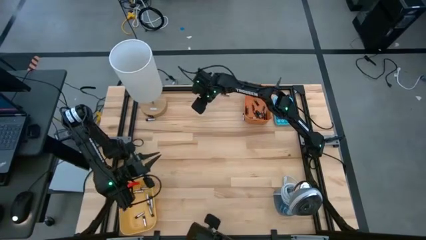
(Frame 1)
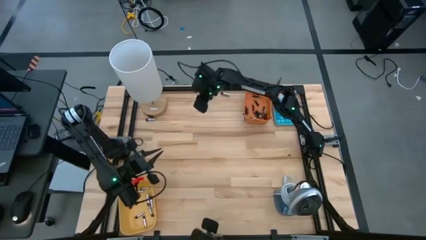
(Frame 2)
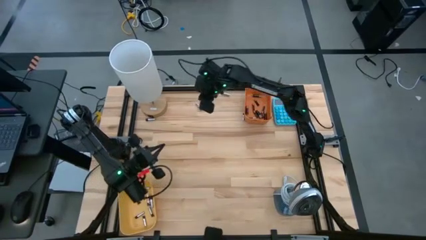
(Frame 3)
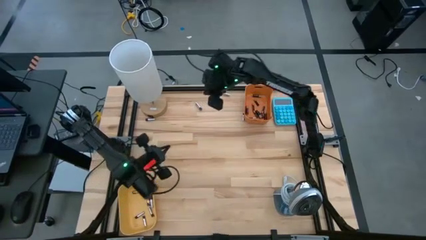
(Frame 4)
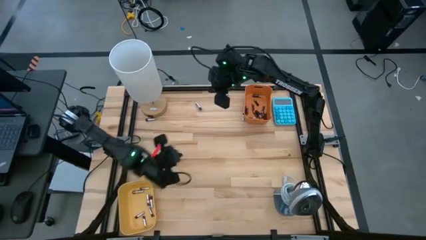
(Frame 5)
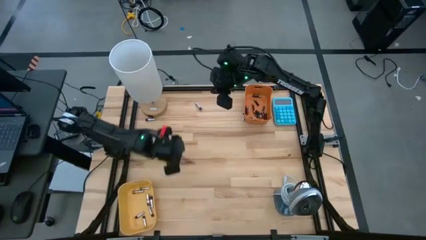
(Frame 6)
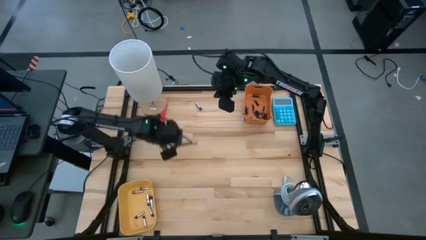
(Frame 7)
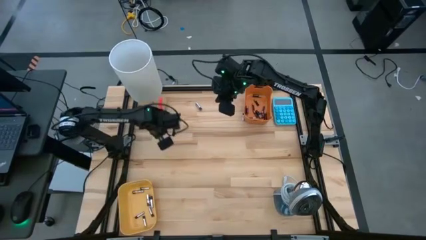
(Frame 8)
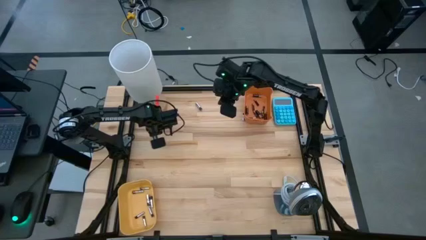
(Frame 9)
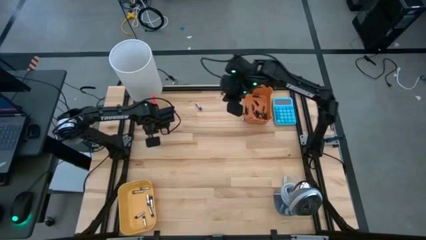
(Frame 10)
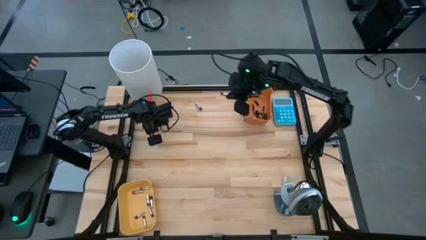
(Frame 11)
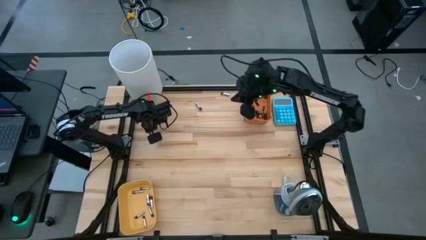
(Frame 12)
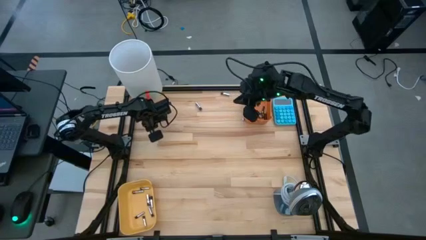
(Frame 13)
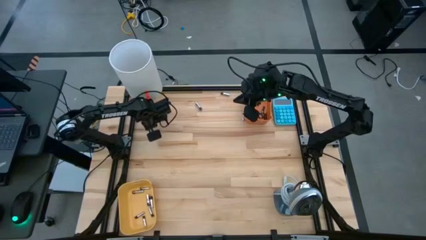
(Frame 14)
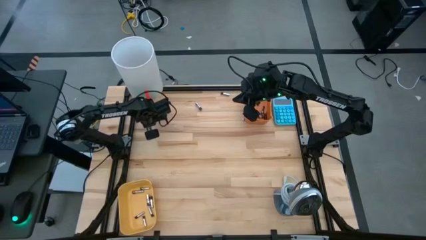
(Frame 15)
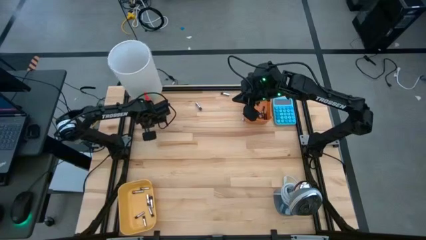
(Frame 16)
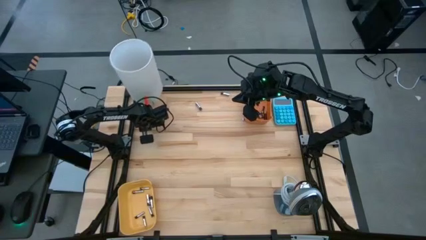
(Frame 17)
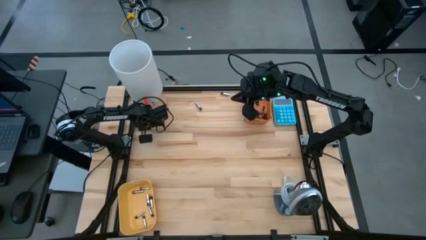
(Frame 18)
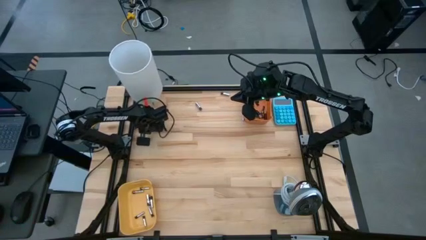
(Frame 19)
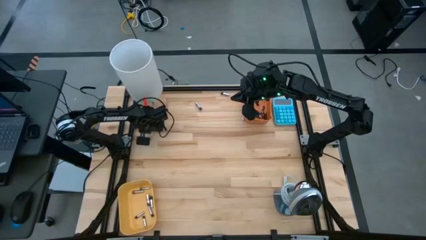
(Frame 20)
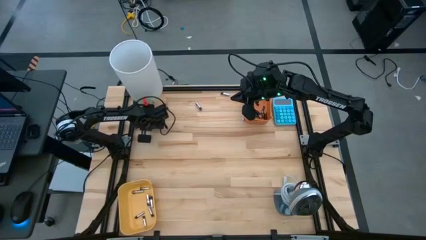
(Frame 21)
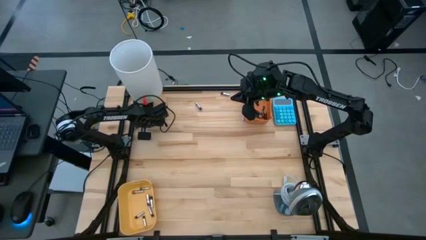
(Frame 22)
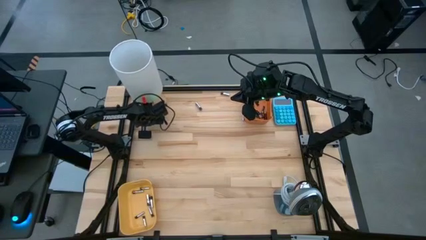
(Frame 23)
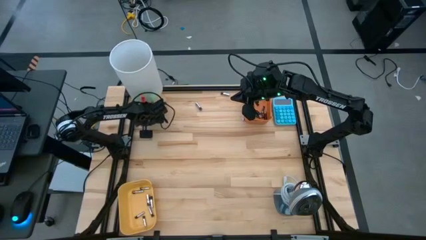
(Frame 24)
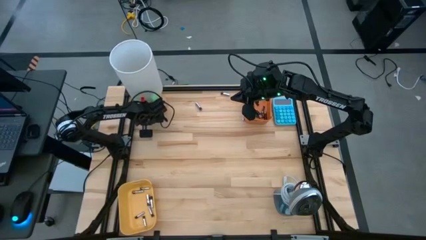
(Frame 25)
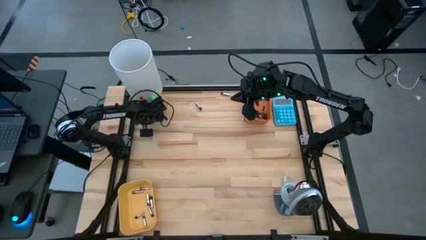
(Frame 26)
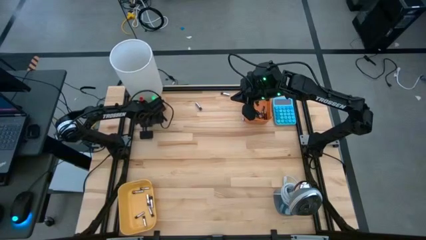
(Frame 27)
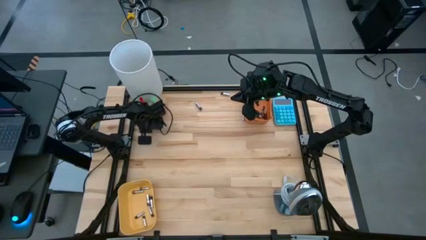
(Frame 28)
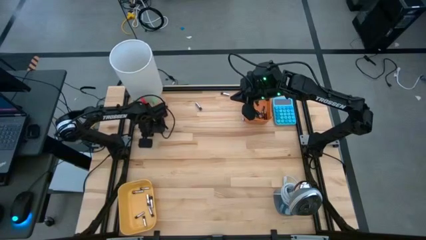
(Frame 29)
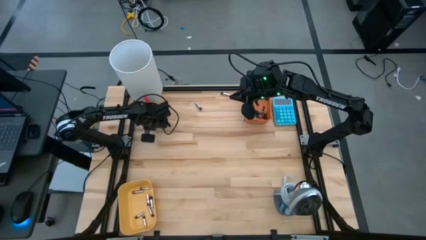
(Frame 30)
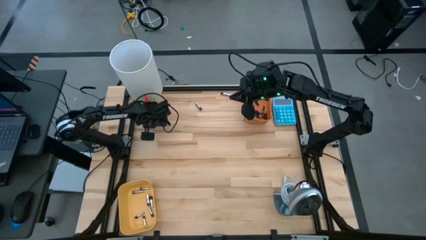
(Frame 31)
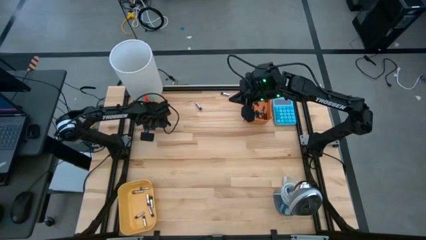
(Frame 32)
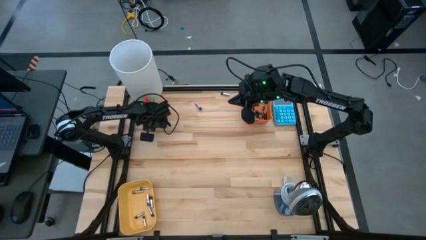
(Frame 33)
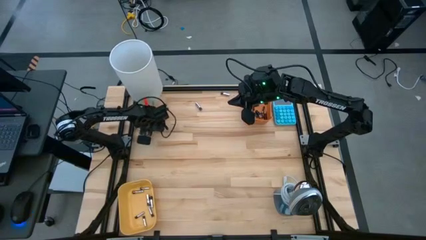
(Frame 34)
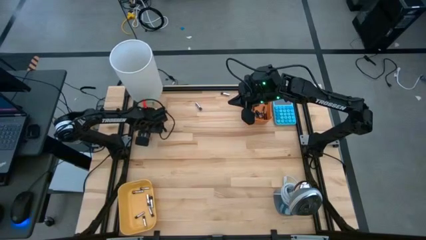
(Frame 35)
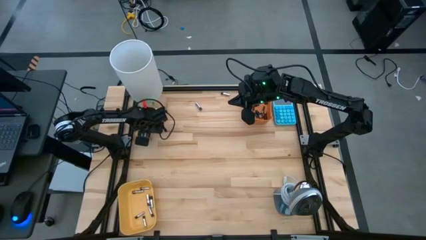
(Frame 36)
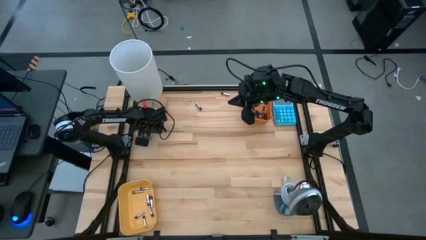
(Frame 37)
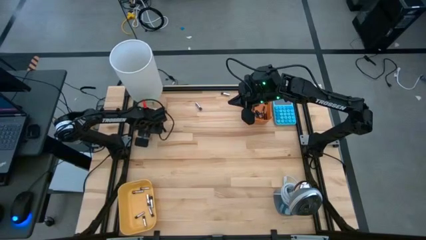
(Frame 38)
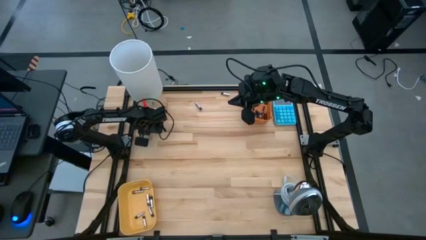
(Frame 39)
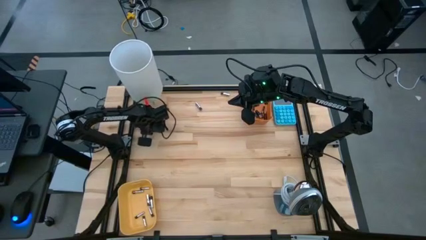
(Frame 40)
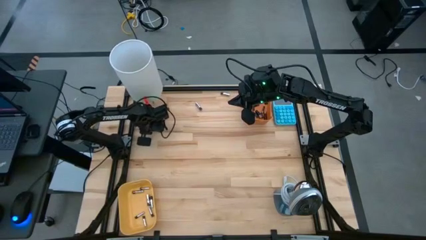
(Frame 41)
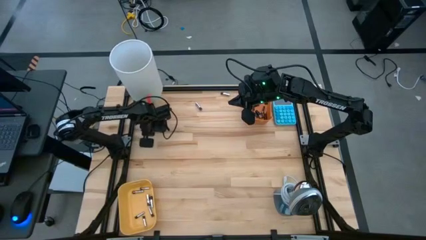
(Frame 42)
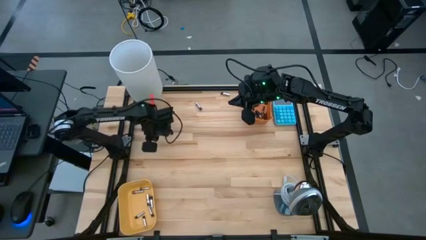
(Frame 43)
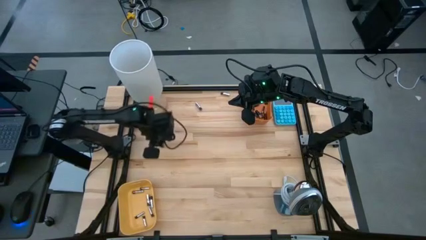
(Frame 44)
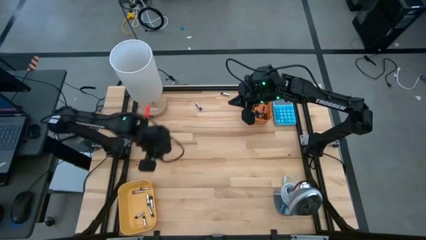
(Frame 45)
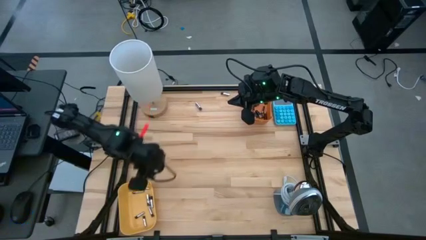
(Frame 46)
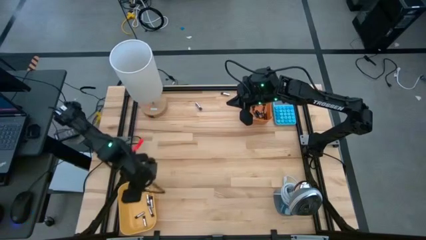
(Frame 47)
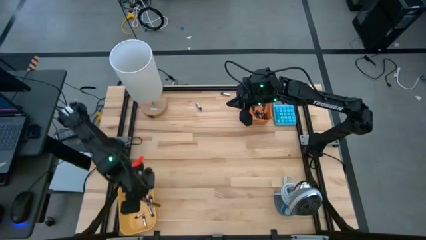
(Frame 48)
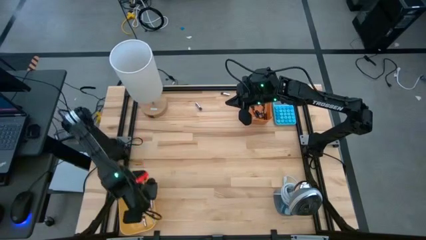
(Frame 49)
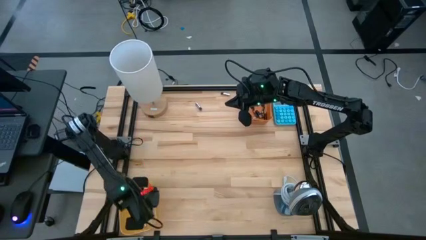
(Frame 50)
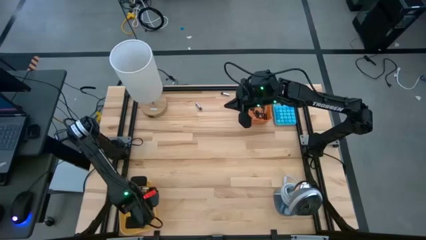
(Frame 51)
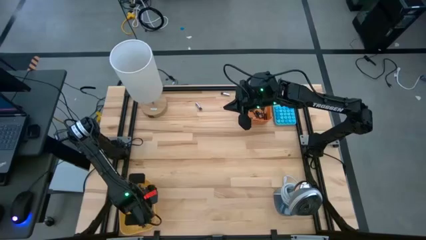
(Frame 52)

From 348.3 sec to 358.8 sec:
Task: Sort batteries
Put the silver battery into the yellow bin
